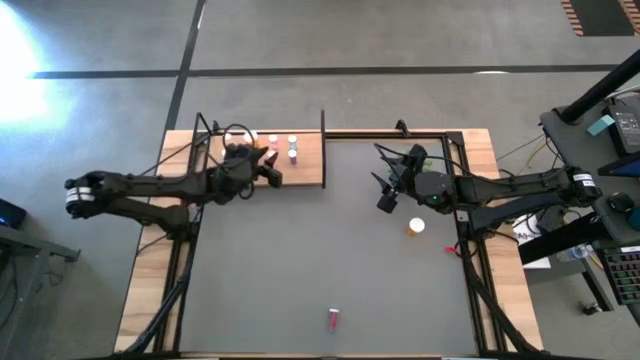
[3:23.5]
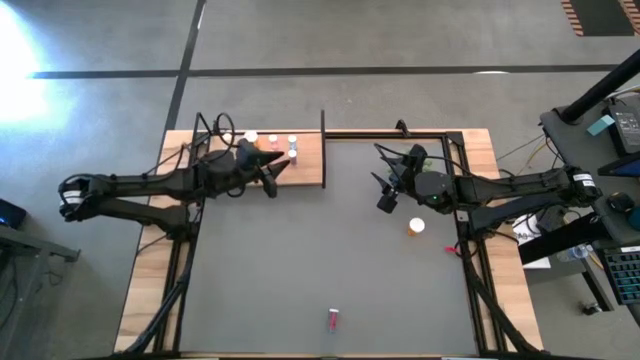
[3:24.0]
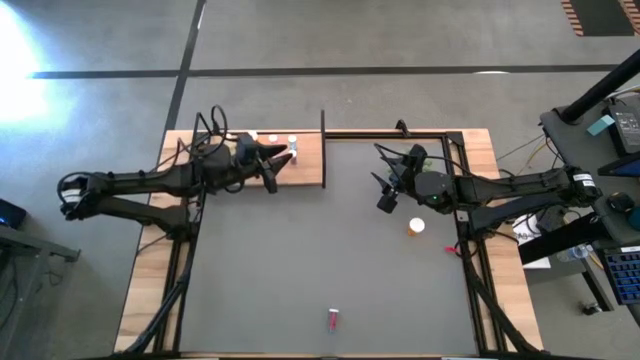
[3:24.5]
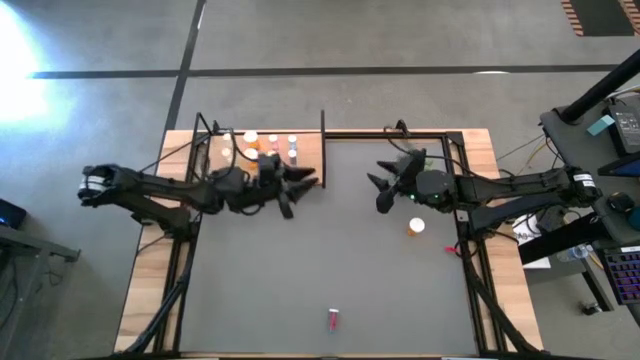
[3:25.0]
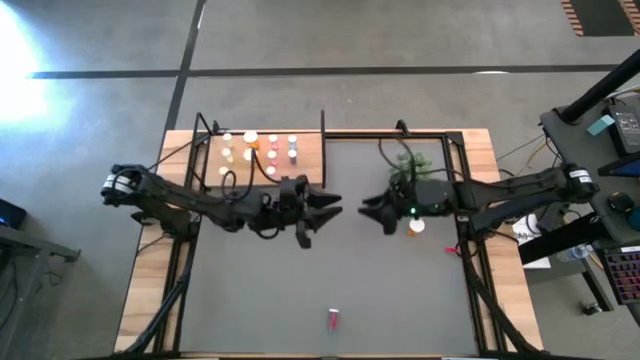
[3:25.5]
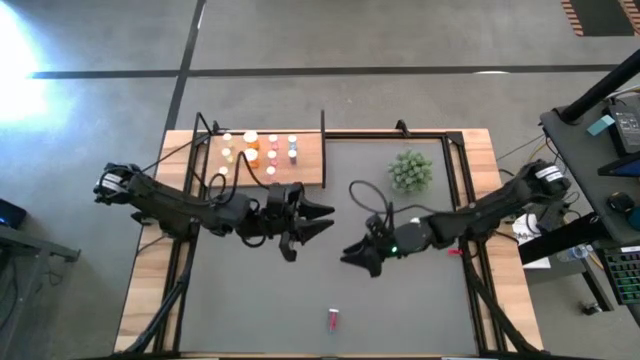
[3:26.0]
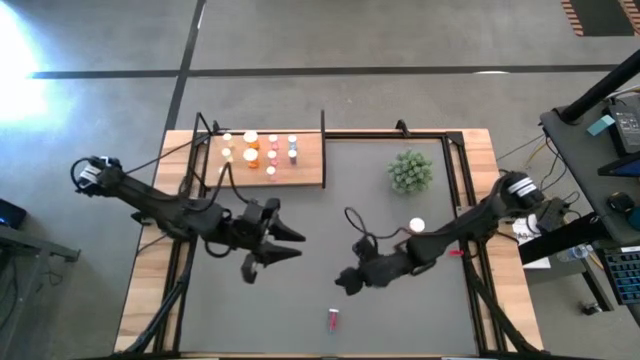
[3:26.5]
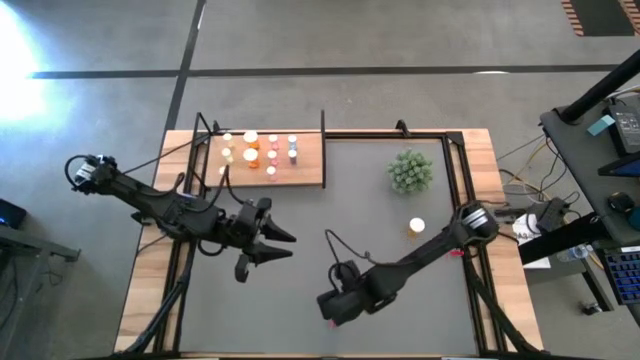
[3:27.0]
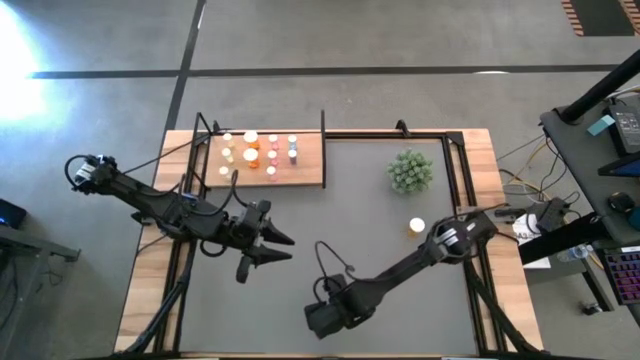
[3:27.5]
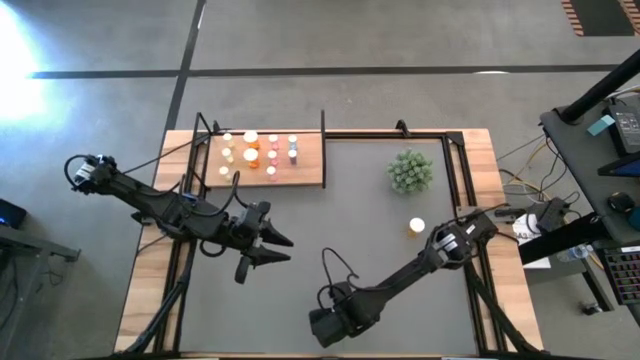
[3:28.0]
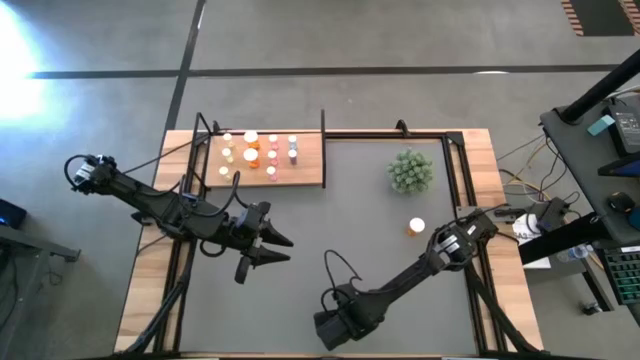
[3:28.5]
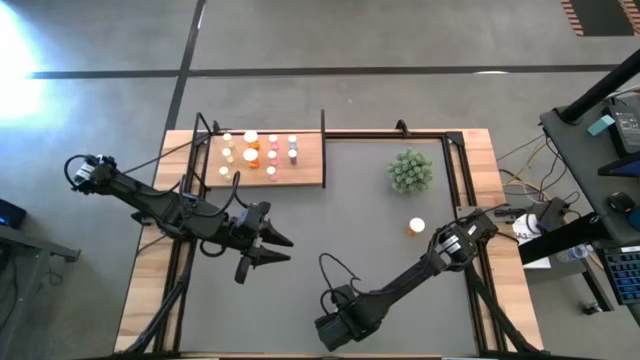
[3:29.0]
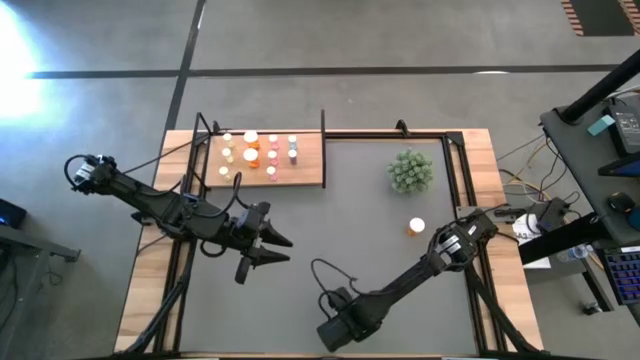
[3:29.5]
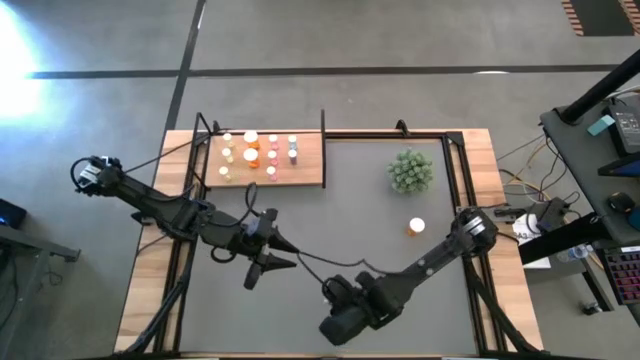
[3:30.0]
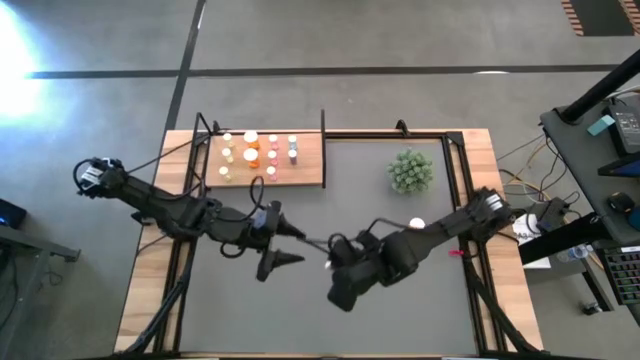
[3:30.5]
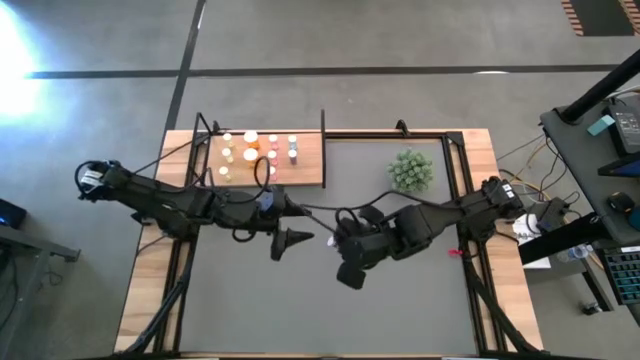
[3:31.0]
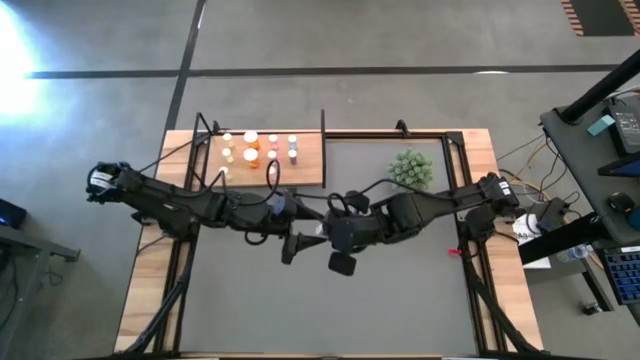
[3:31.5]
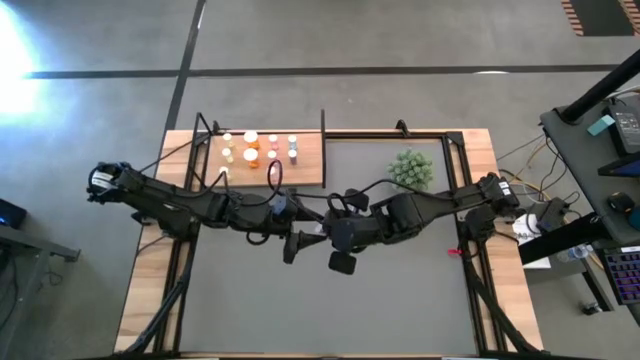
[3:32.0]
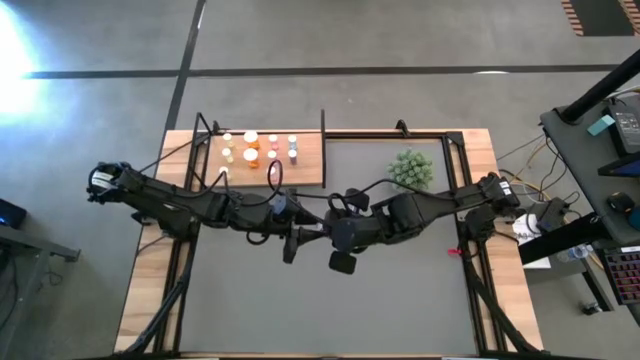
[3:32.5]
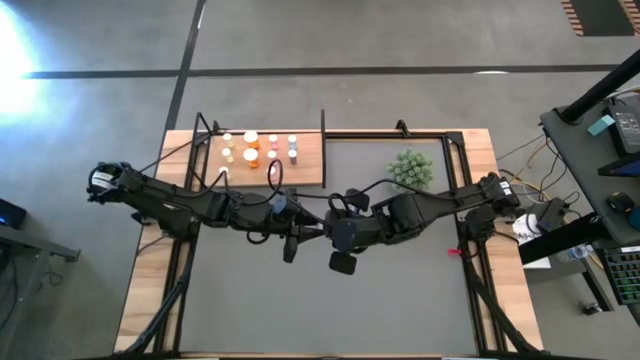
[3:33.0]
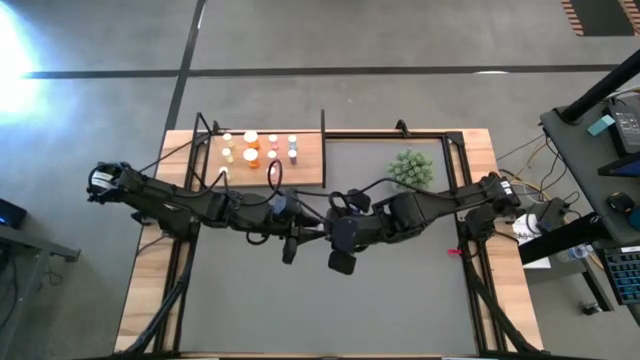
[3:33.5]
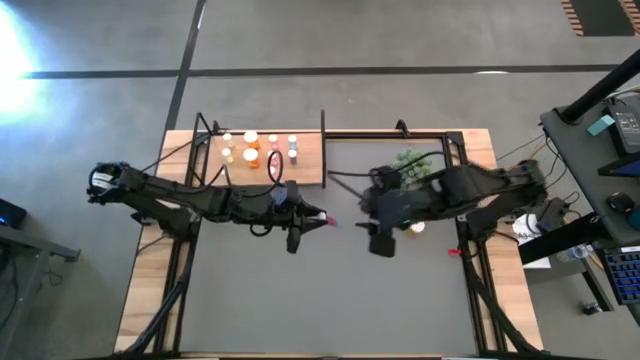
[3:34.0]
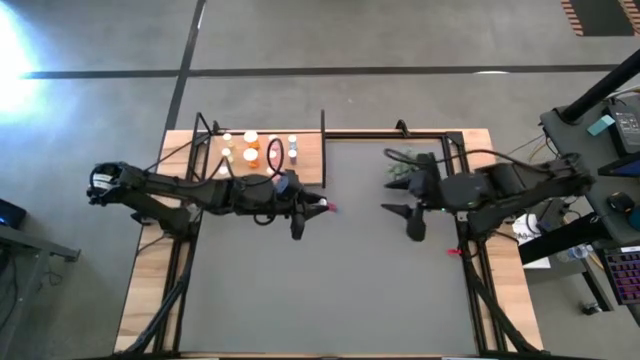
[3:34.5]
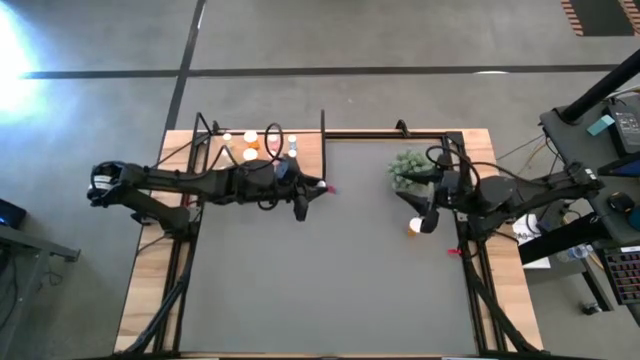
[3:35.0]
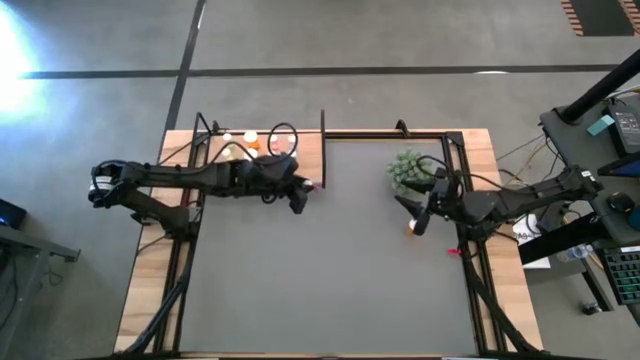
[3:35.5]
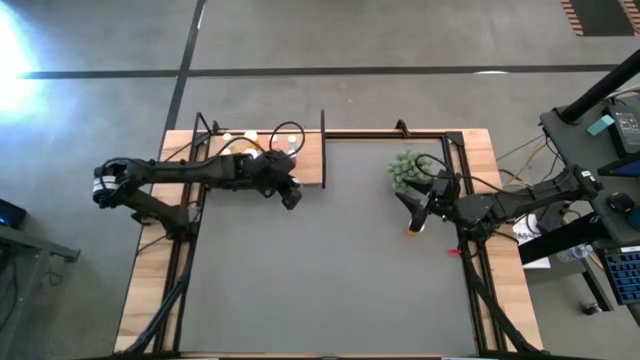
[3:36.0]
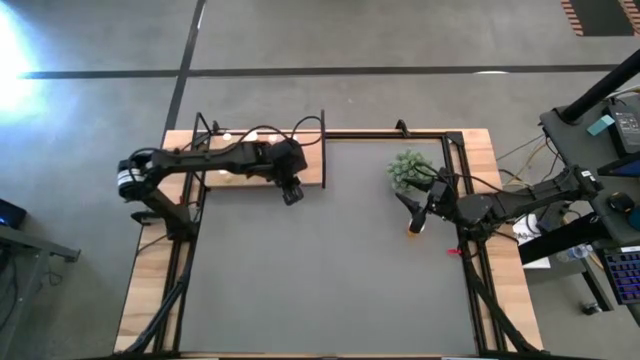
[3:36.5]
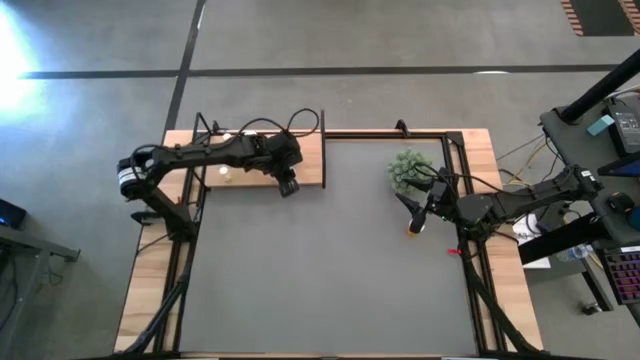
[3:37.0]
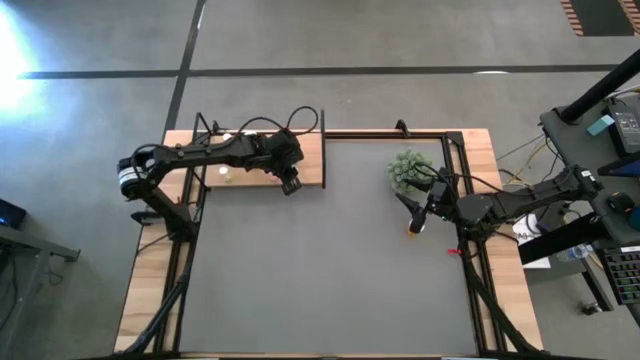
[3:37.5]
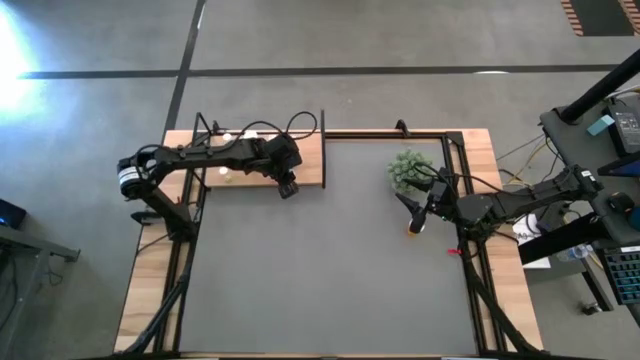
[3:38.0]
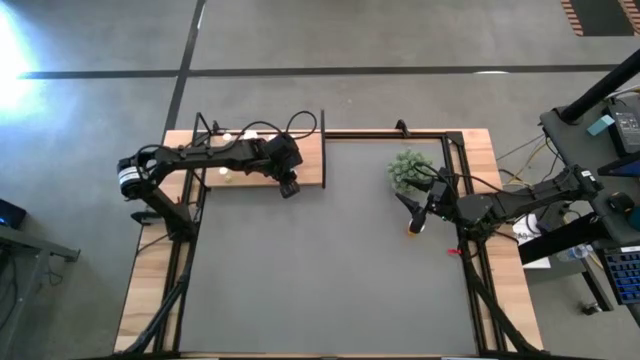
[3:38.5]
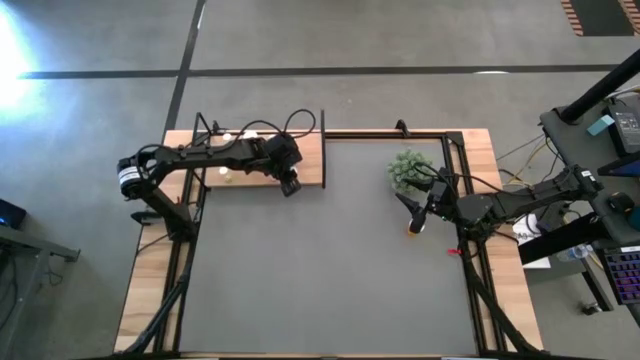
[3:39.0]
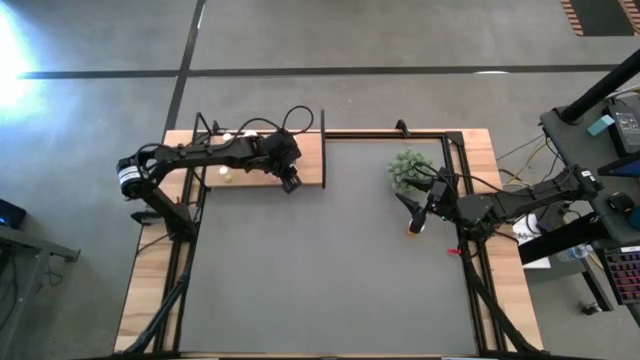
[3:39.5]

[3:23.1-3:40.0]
Task: Pick and place medicine bottles onto shelf by color
Put the blue pill bottle on the shelf aligned with the other blue bottles

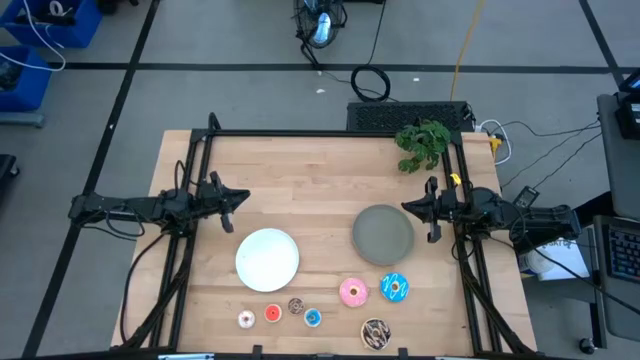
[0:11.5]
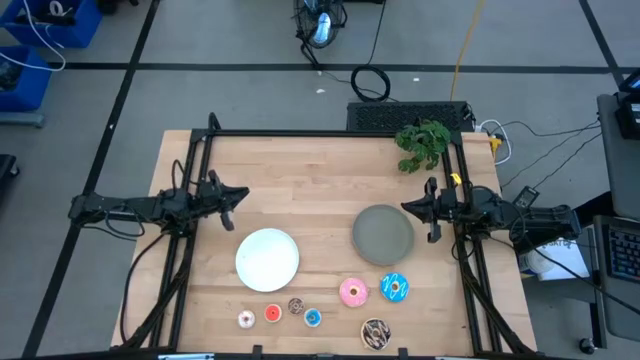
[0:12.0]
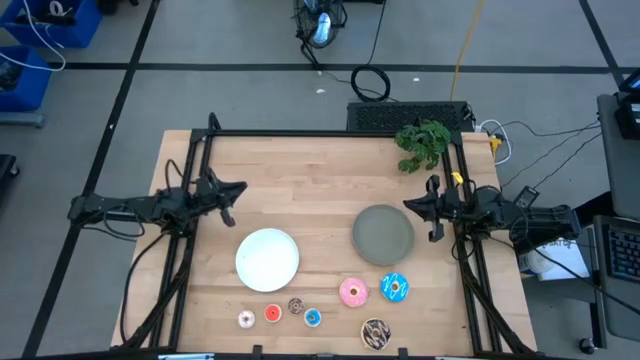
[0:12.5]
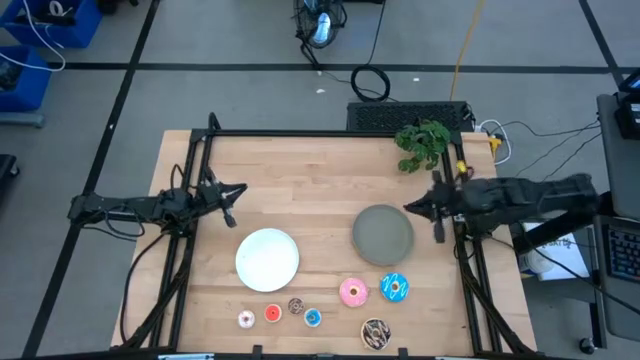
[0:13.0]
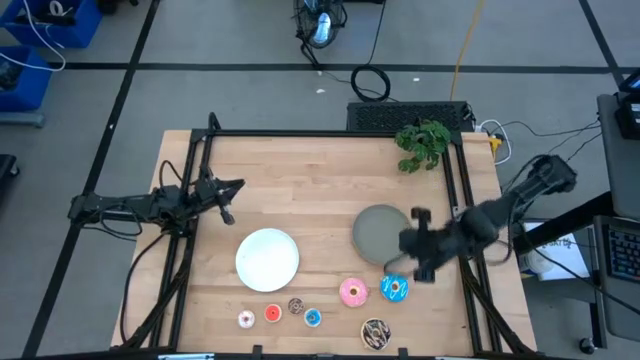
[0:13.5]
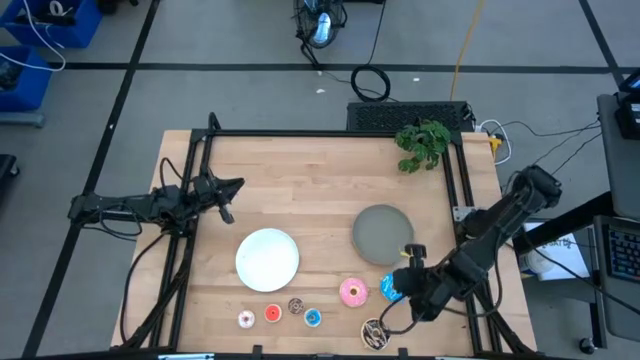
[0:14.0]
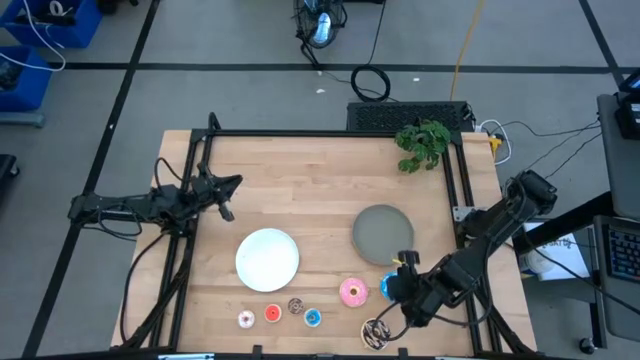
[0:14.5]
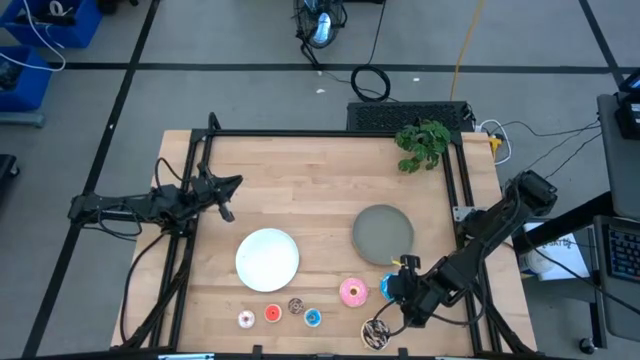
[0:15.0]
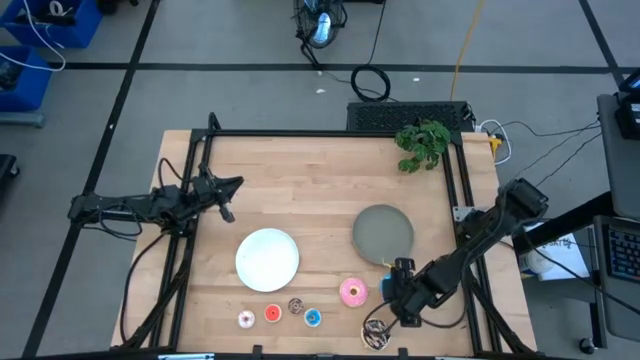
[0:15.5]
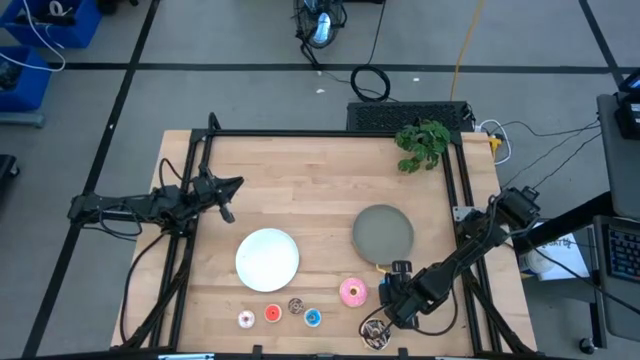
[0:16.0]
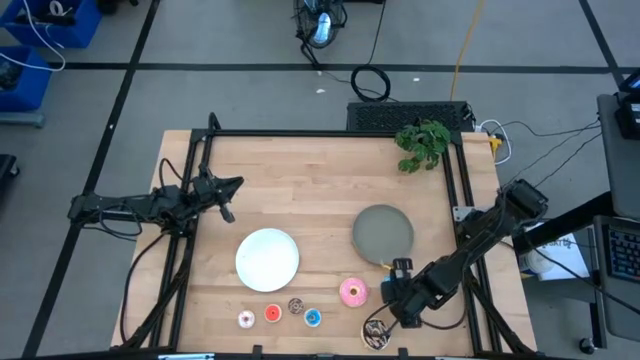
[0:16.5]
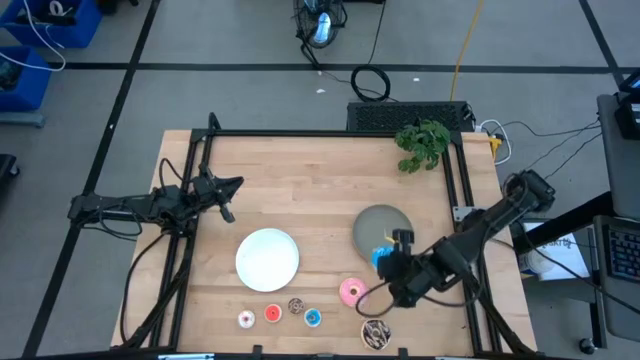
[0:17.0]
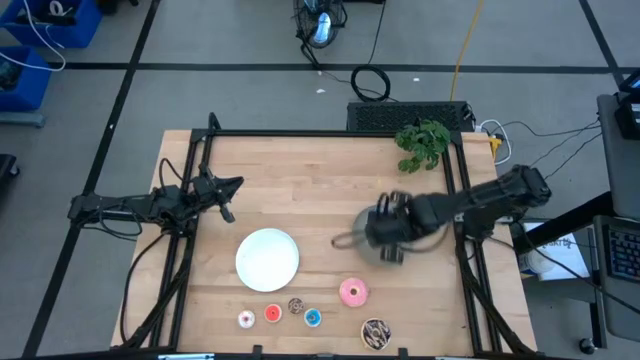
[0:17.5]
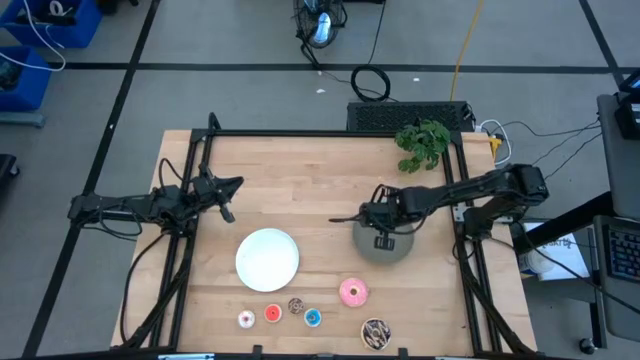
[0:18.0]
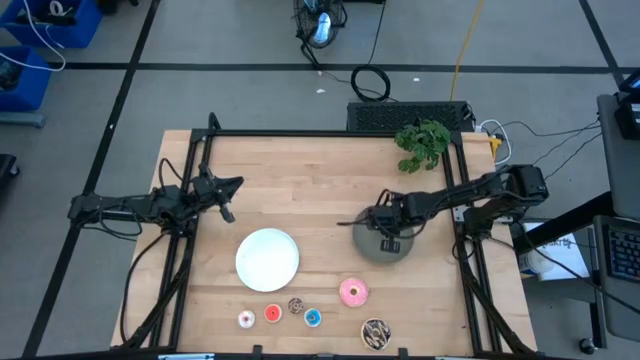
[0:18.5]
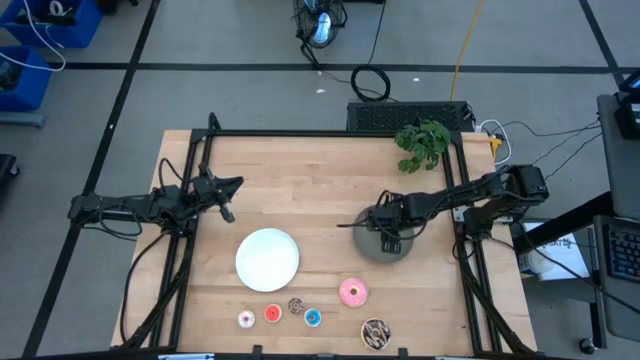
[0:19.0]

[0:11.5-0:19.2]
Task: Pick & Place donuts
Put the large blue donut on the gray plate
